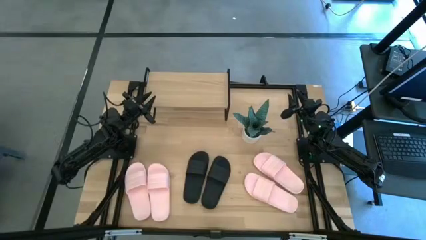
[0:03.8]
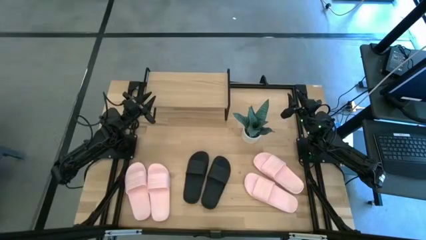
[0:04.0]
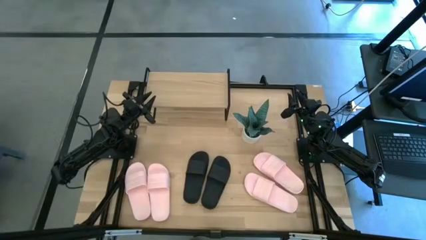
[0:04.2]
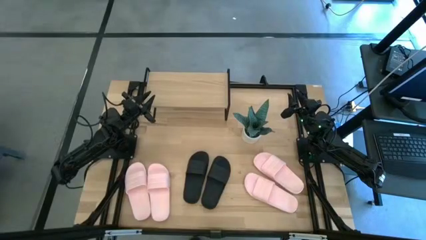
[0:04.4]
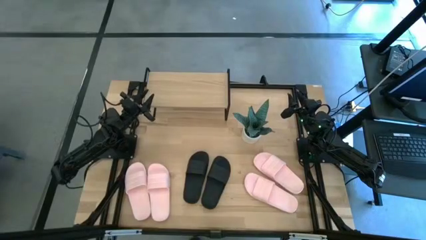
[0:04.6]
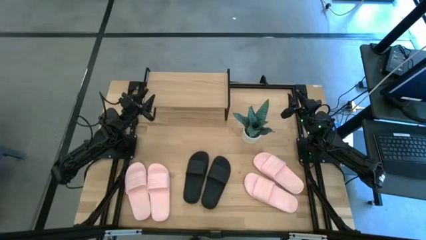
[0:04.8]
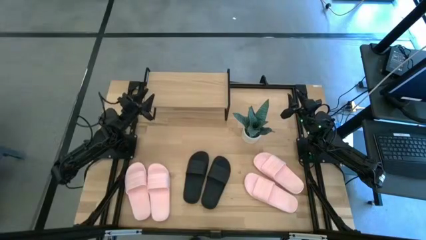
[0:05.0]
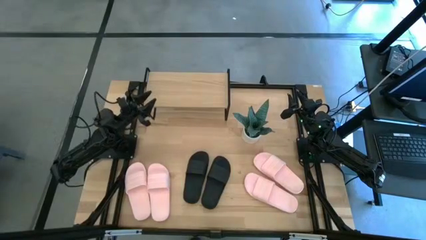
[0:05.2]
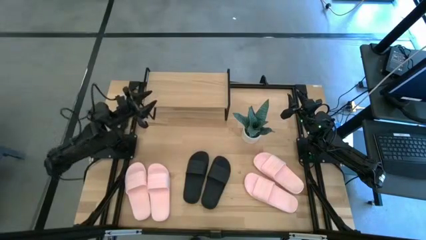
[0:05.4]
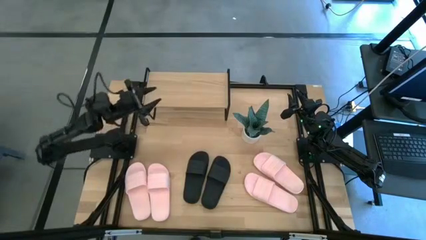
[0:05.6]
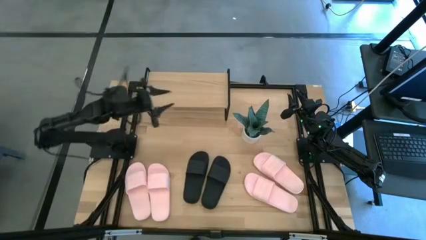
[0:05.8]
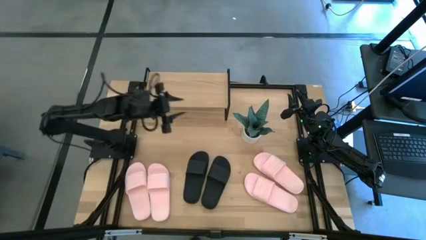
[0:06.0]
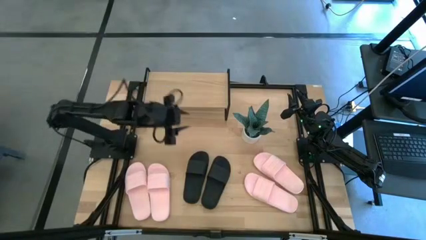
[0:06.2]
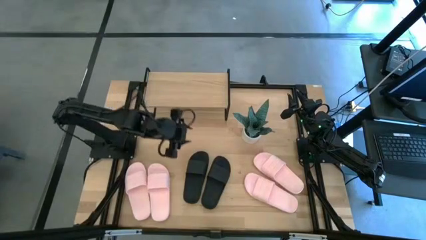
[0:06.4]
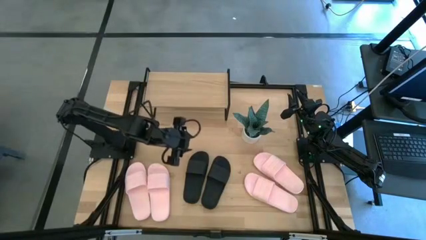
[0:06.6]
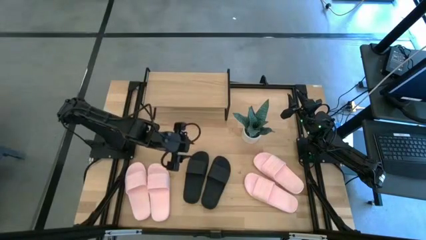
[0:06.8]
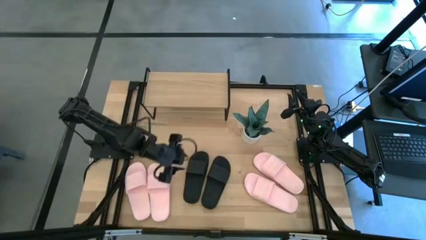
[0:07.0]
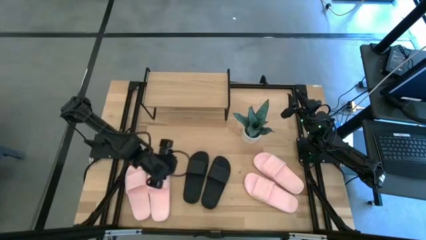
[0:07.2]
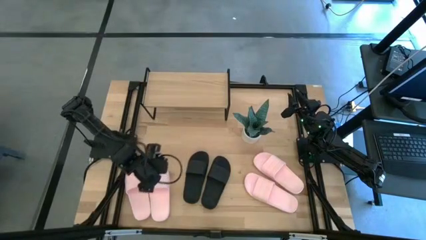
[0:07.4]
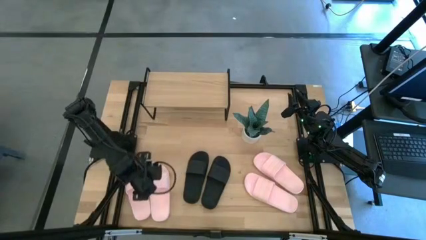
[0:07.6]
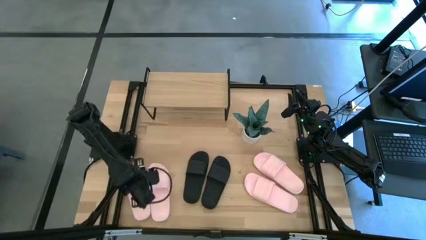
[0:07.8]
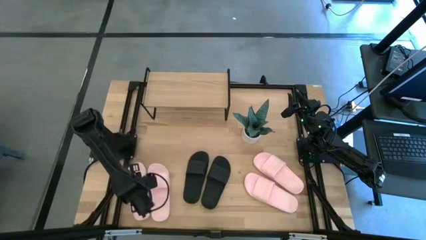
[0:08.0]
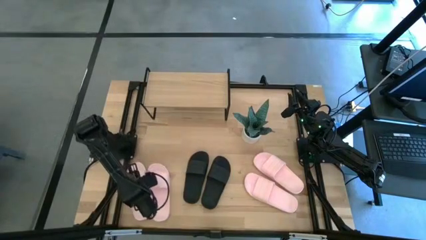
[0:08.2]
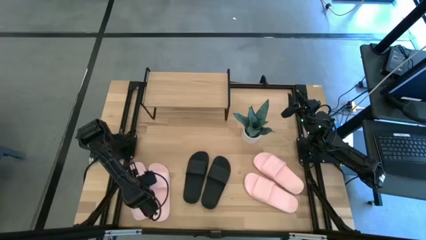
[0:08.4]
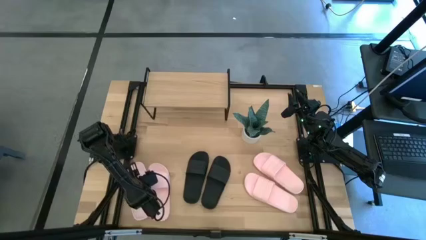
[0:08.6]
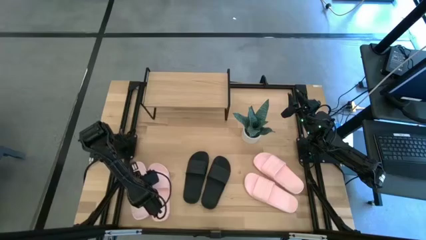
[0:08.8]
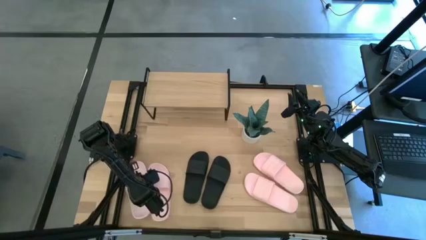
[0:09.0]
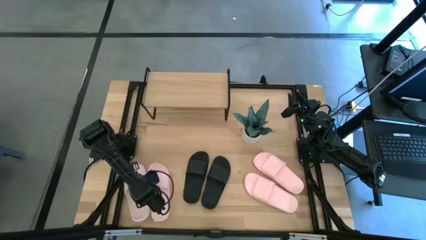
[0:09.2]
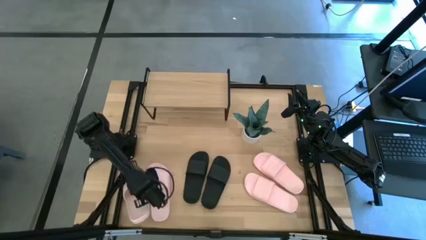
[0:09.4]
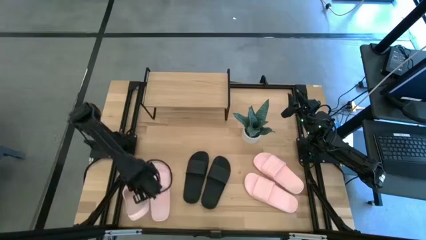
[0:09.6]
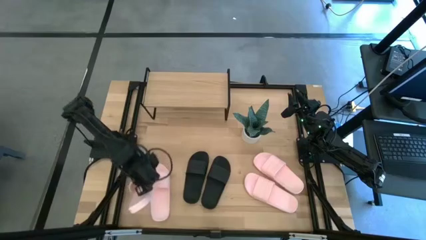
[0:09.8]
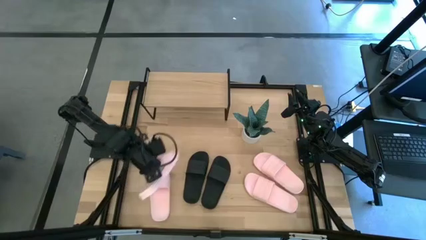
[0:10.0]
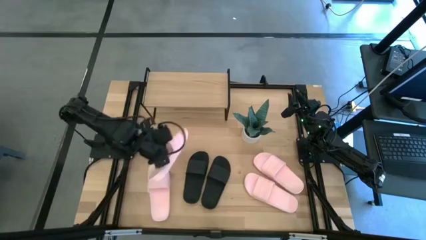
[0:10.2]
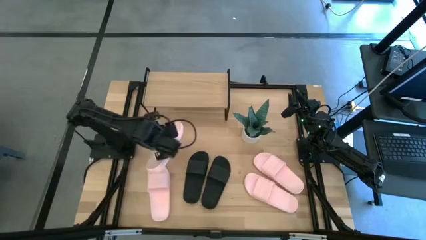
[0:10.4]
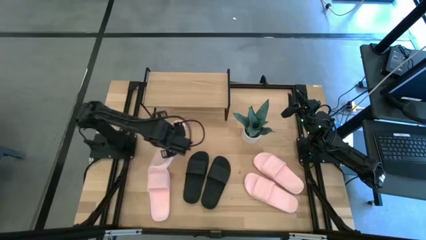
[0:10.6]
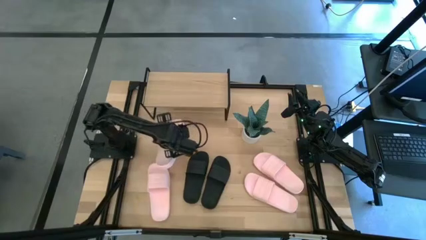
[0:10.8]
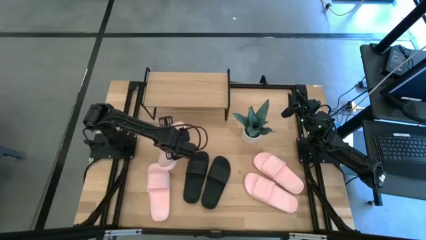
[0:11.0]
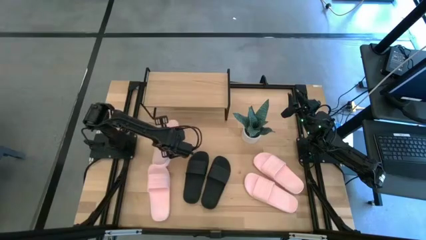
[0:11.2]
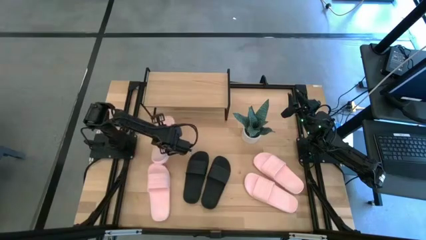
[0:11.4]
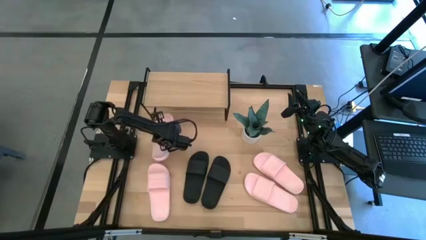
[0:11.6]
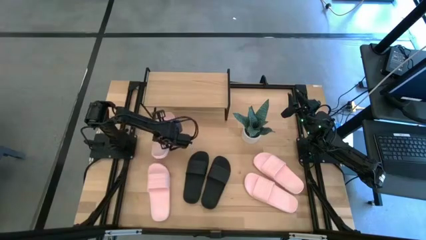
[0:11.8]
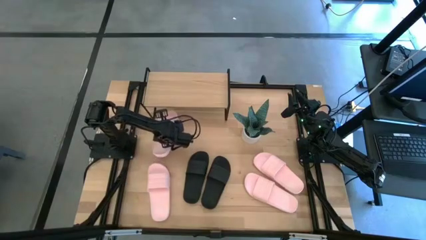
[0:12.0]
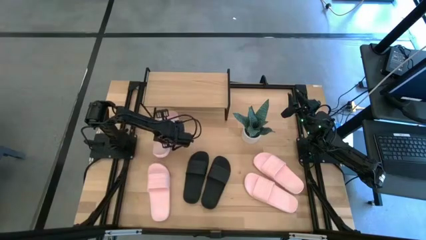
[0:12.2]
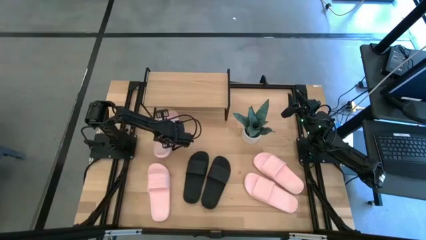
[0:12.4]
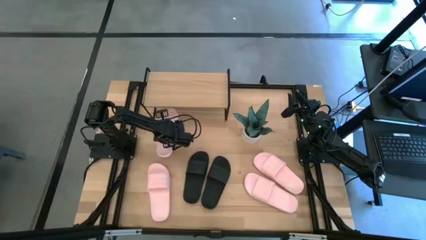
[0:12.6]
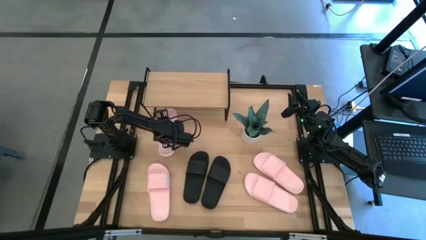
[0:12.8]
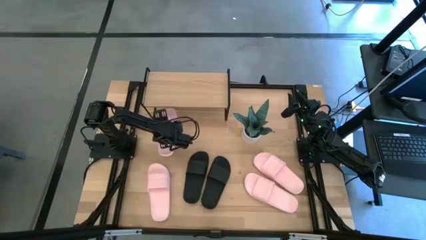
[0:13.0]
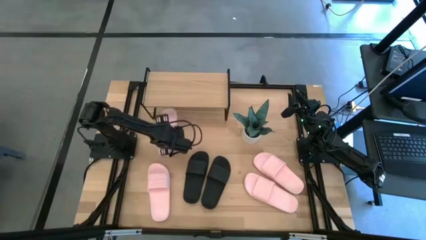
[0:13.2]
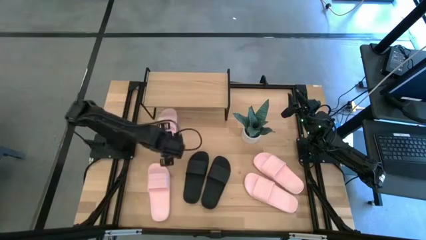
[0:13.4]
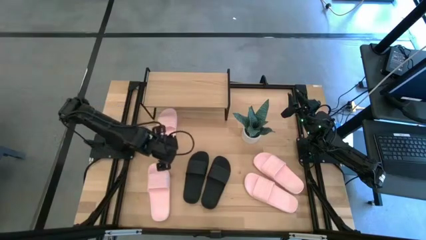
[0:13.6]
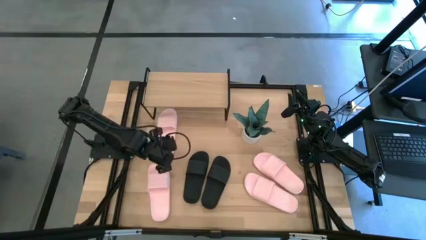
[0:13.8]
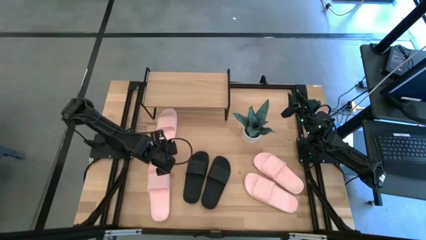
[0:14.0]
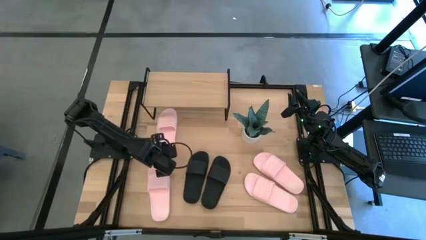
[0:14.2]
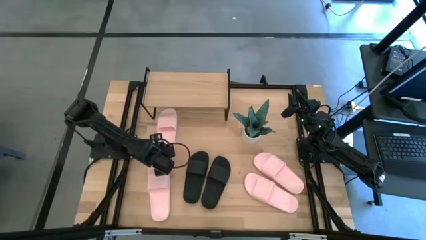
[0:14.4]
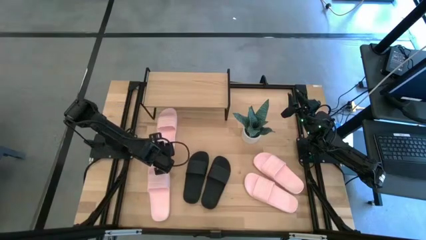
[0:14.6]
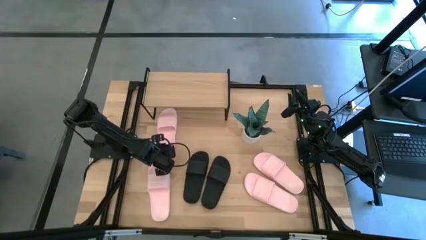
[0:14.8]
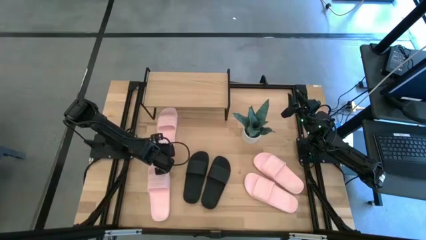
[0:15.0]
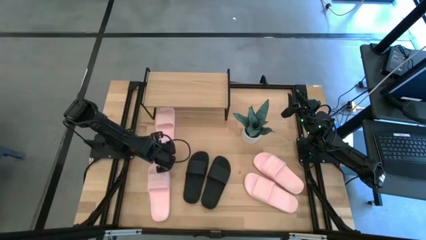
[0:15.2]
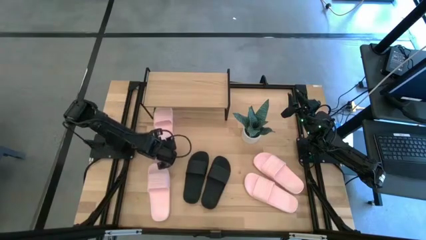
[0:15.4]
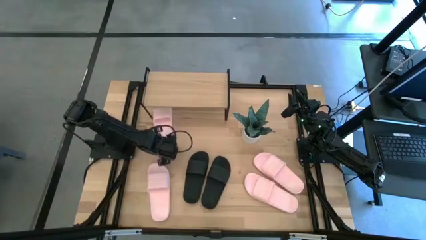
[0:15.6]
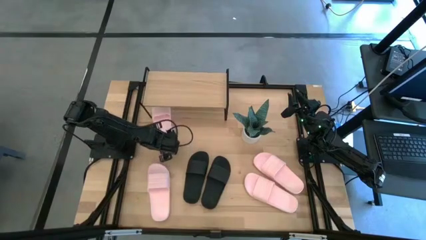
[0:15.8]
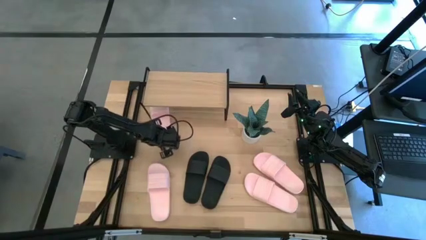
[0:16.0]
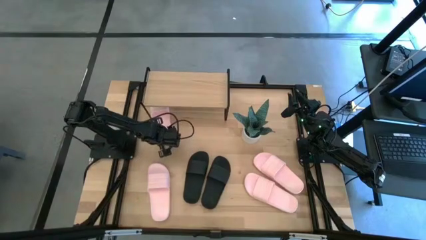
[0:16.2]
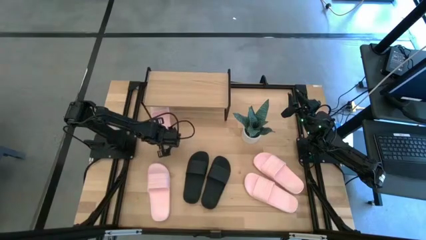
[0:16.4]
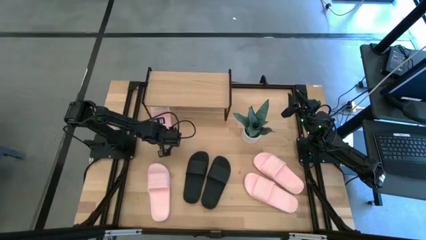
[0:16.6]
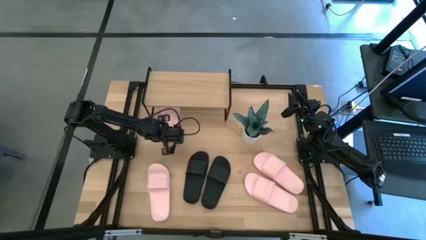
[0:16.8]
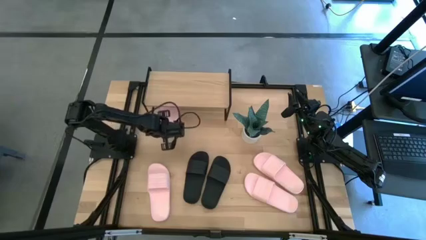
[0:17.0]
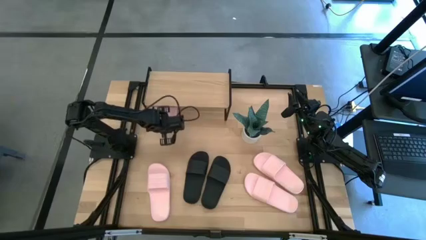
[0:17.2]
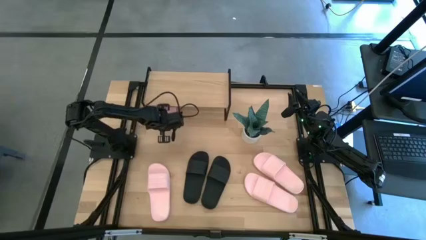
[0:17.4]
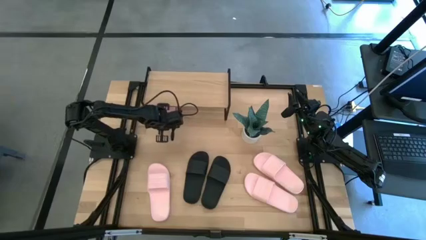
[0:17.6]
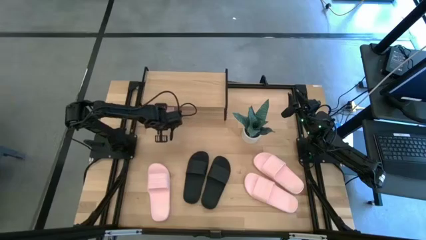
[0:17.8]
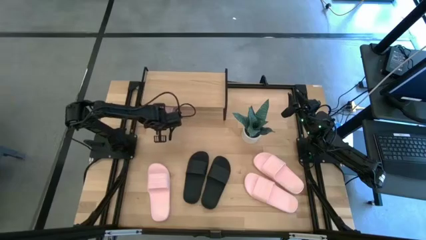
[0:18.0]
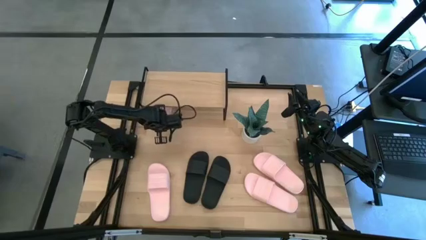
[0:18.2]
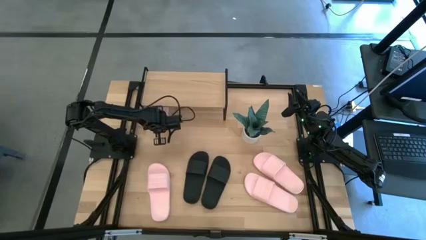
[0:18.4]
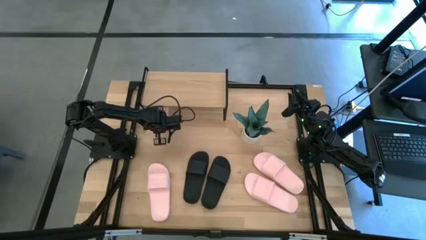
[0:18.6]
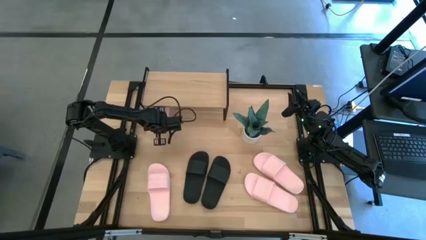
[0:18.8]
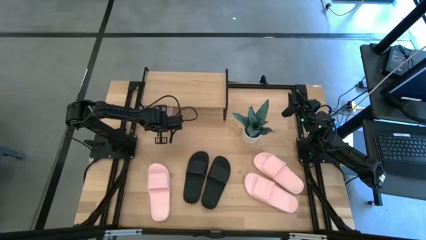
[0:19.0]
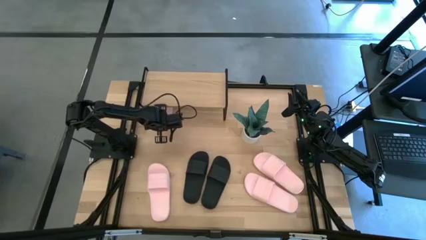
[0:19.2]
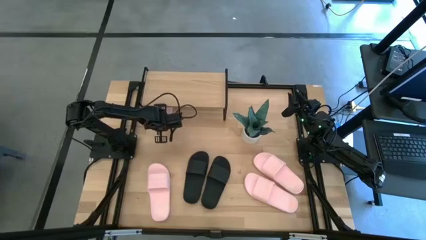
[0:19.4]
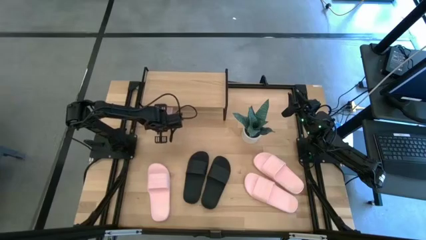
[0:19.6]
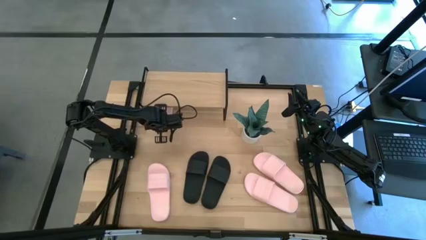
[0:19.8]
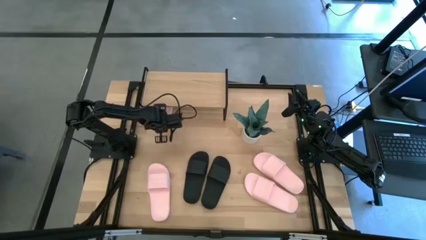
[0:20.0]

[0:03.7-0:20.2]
Task: Pick and place slides into the shelf
Put the pink slipper under the shelf
